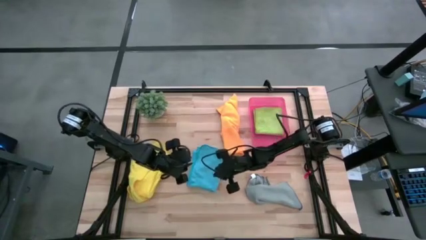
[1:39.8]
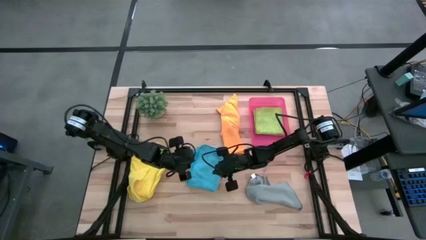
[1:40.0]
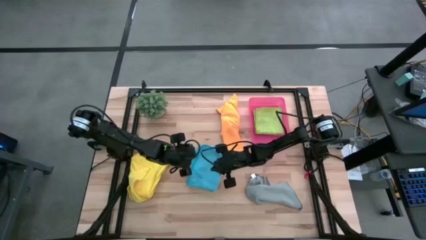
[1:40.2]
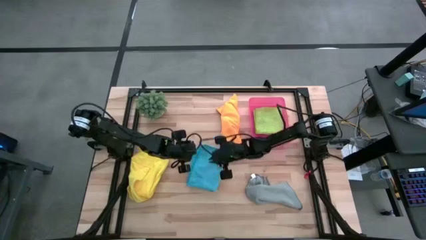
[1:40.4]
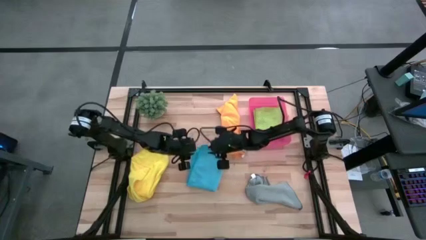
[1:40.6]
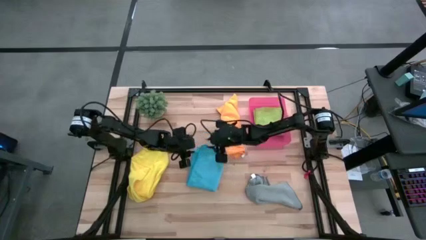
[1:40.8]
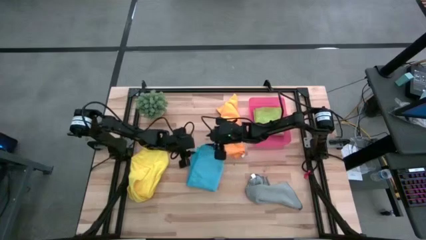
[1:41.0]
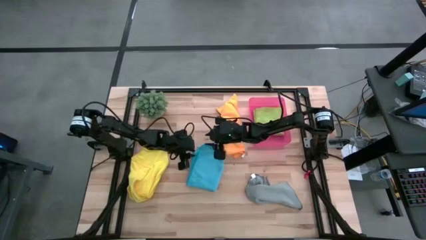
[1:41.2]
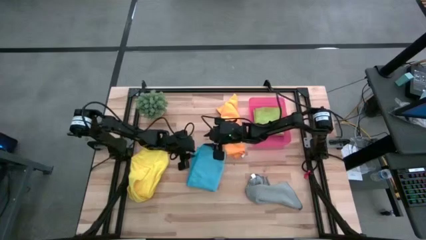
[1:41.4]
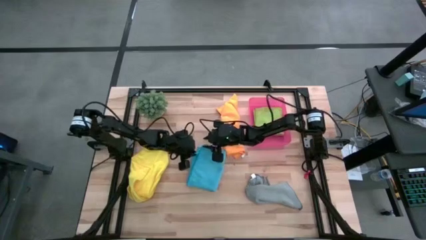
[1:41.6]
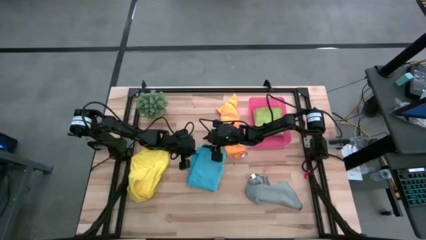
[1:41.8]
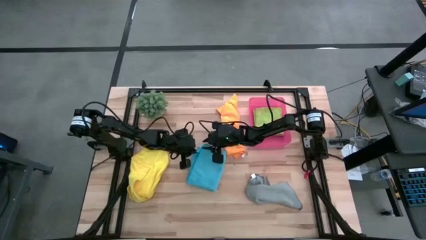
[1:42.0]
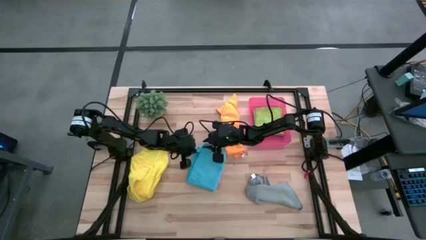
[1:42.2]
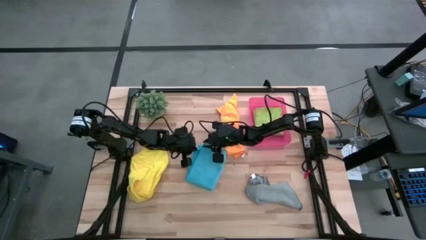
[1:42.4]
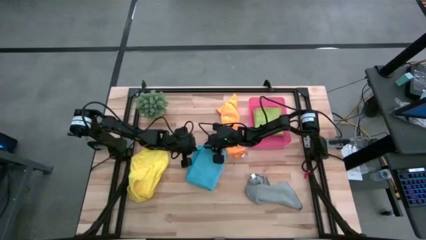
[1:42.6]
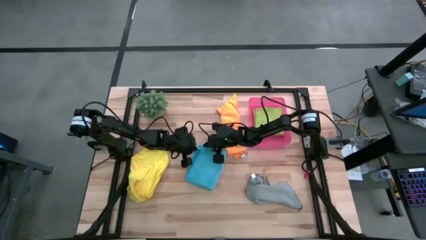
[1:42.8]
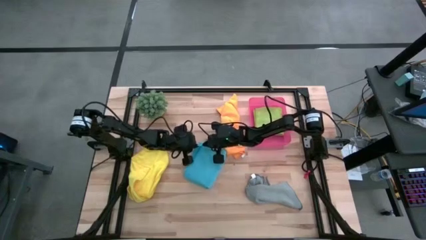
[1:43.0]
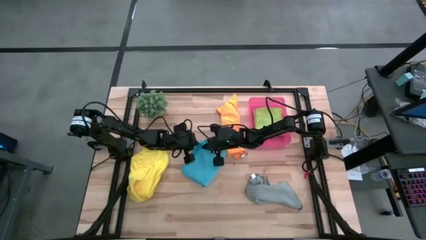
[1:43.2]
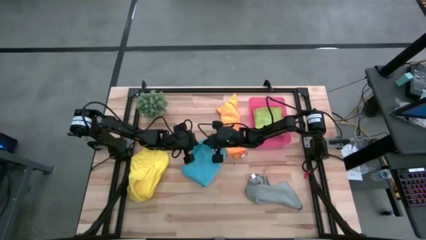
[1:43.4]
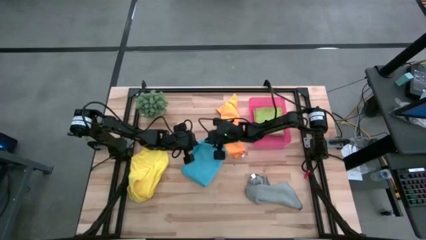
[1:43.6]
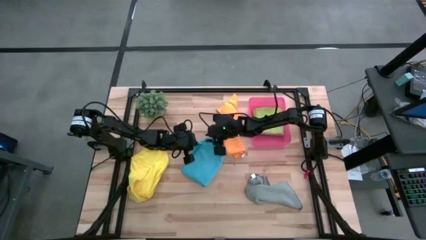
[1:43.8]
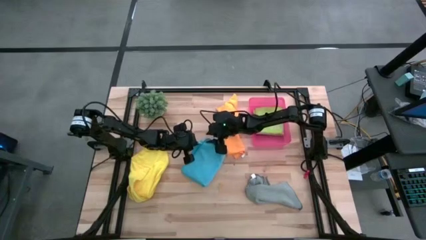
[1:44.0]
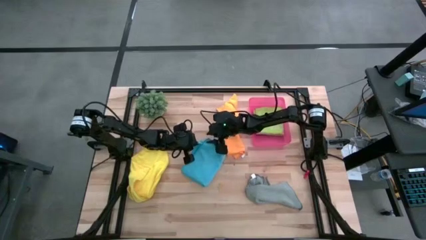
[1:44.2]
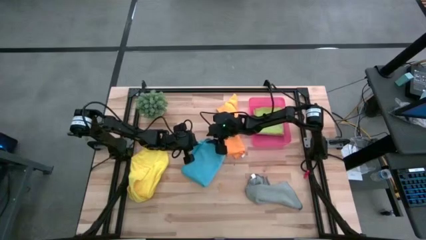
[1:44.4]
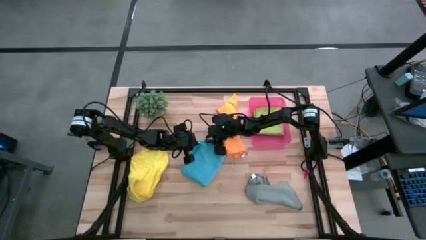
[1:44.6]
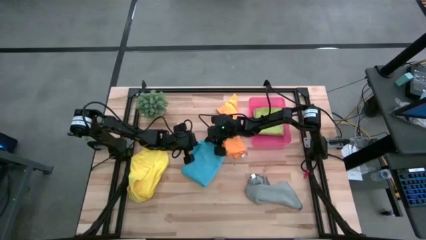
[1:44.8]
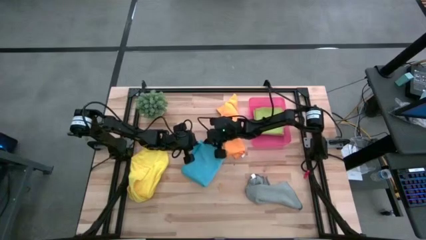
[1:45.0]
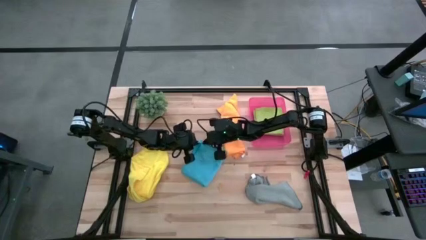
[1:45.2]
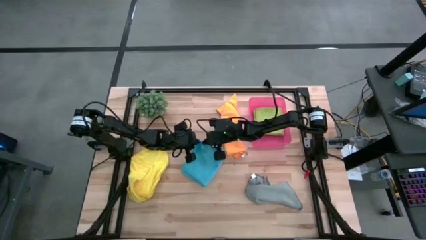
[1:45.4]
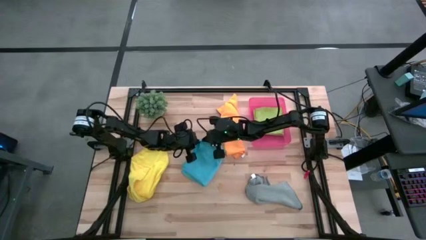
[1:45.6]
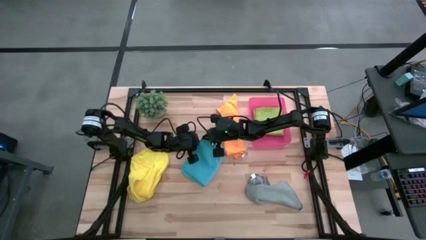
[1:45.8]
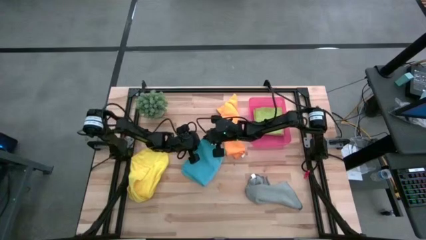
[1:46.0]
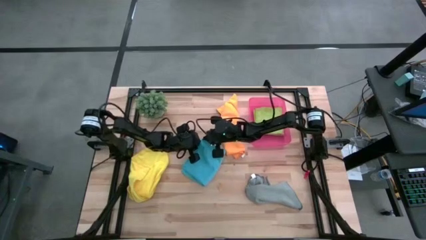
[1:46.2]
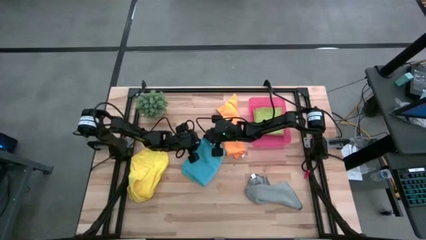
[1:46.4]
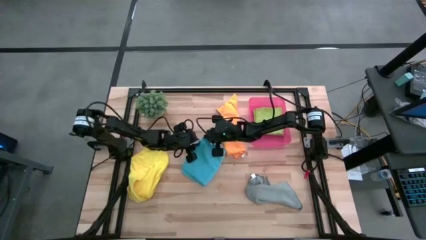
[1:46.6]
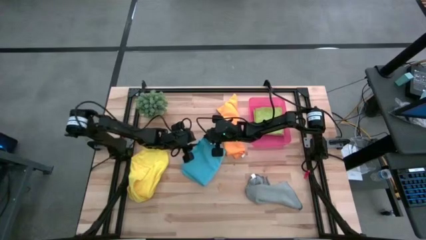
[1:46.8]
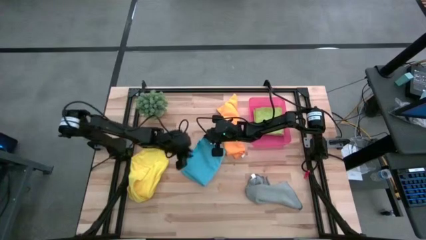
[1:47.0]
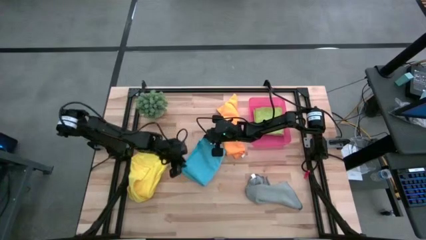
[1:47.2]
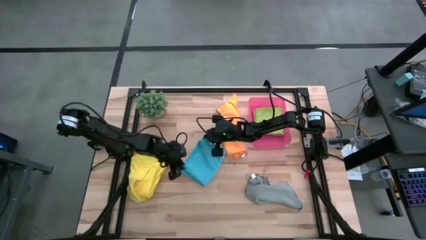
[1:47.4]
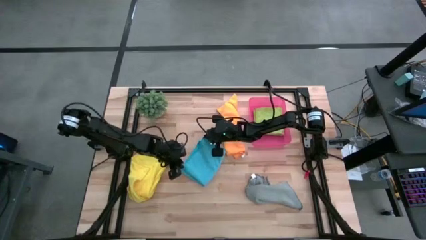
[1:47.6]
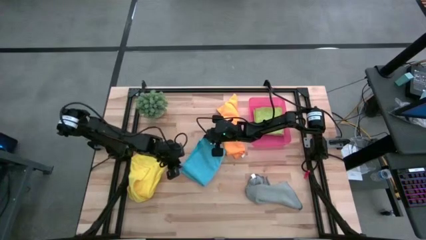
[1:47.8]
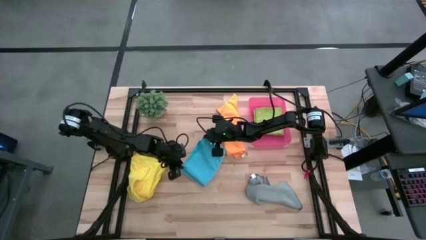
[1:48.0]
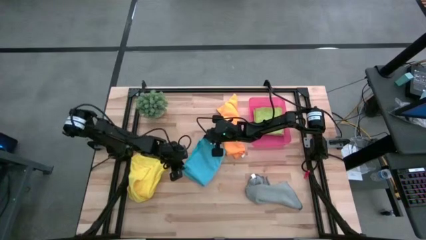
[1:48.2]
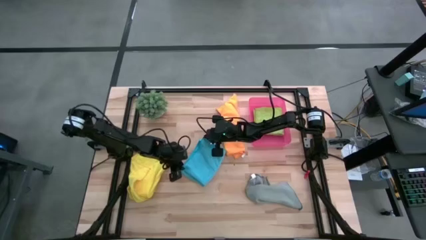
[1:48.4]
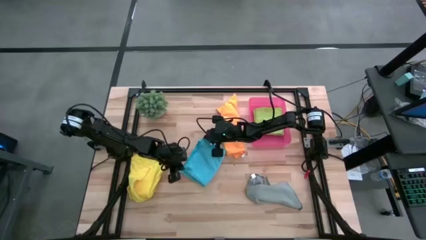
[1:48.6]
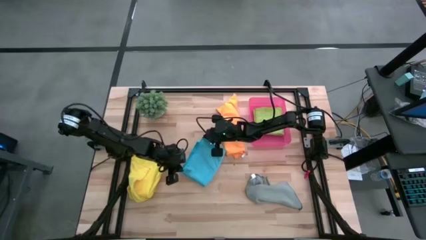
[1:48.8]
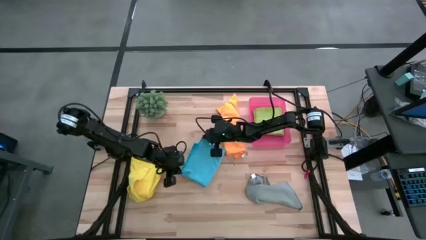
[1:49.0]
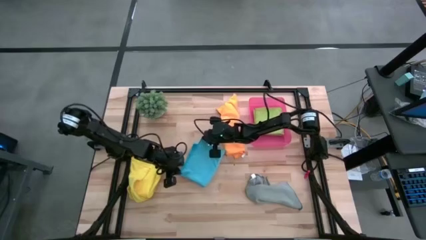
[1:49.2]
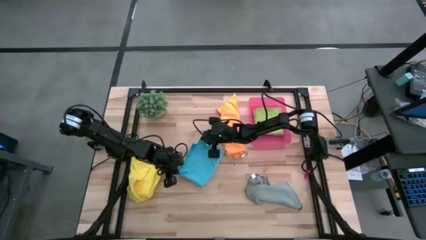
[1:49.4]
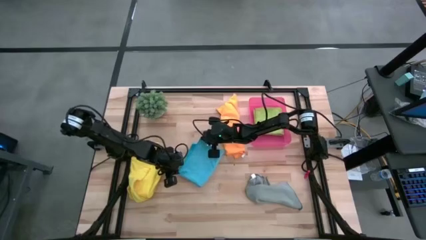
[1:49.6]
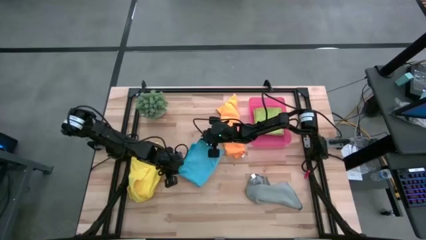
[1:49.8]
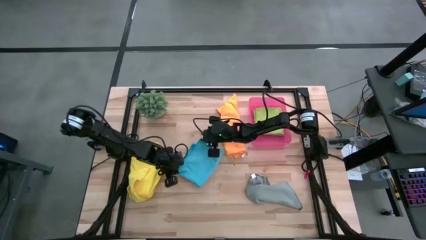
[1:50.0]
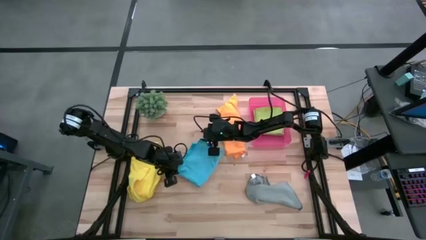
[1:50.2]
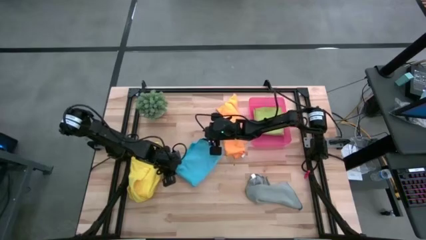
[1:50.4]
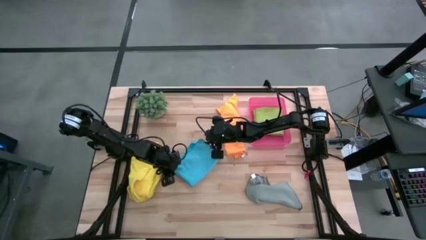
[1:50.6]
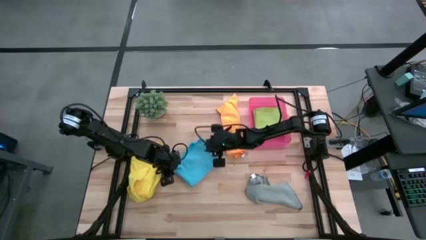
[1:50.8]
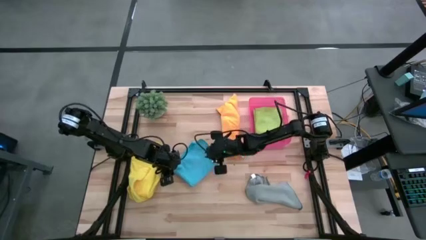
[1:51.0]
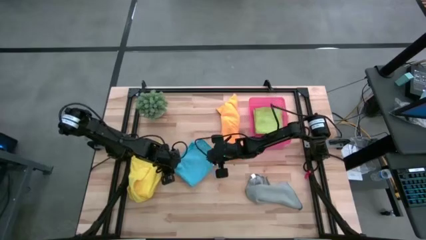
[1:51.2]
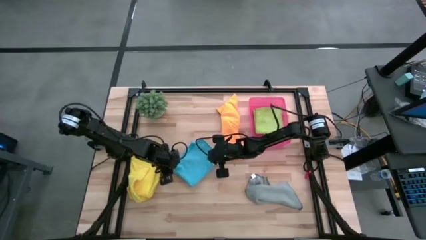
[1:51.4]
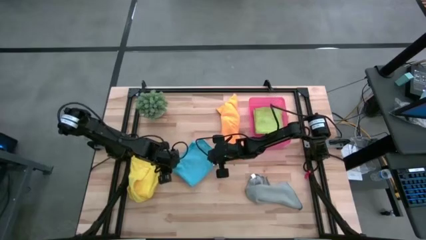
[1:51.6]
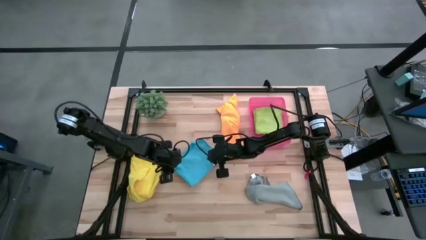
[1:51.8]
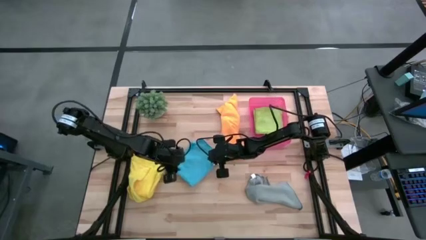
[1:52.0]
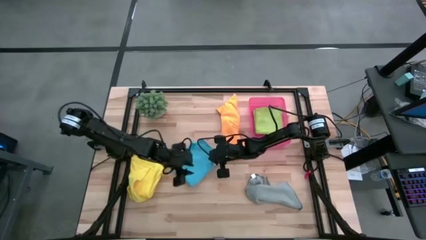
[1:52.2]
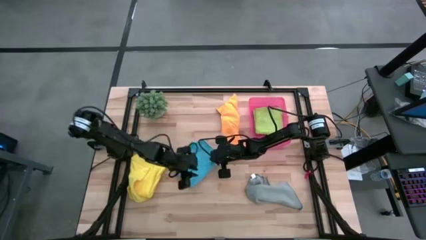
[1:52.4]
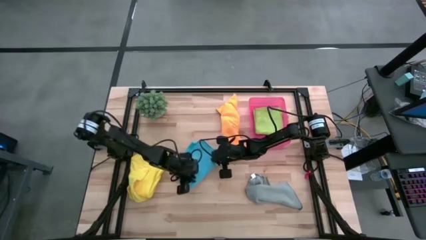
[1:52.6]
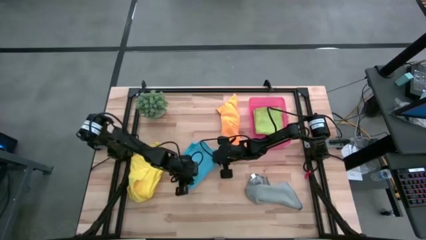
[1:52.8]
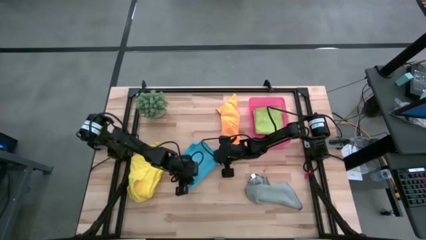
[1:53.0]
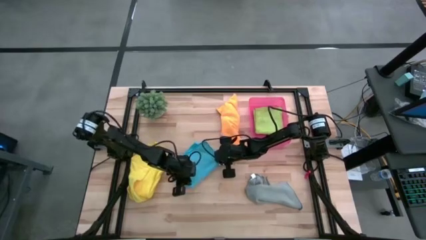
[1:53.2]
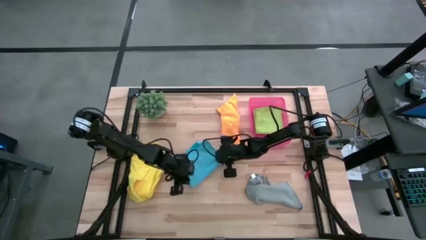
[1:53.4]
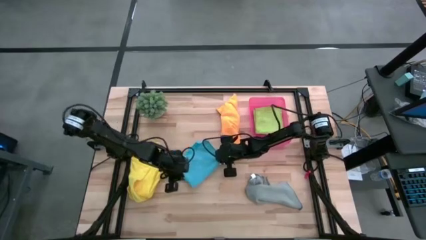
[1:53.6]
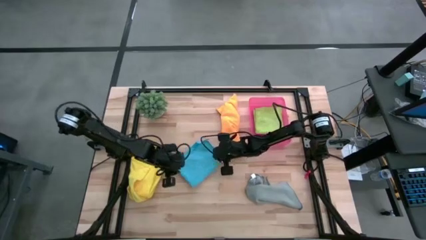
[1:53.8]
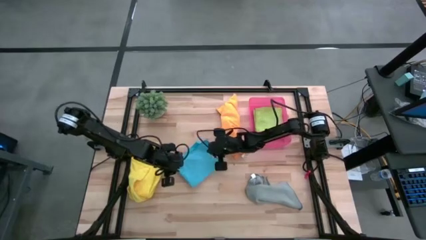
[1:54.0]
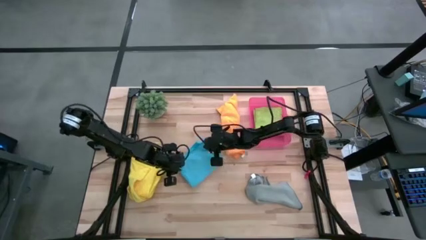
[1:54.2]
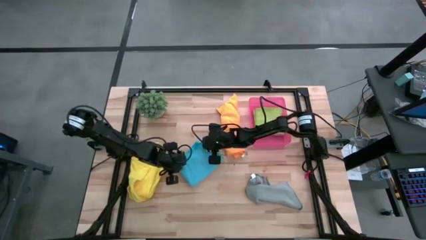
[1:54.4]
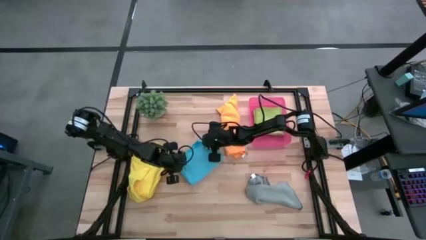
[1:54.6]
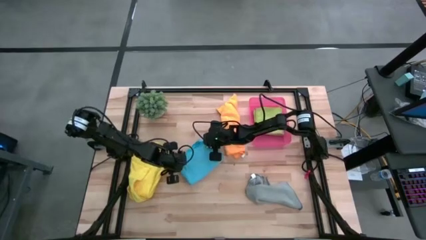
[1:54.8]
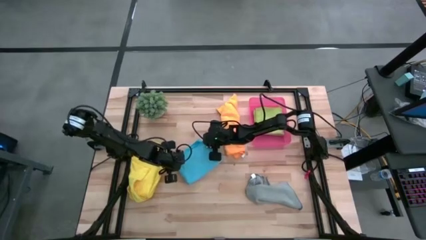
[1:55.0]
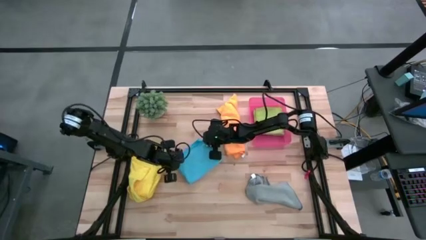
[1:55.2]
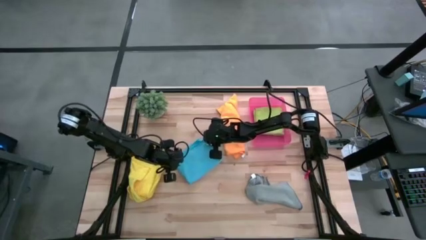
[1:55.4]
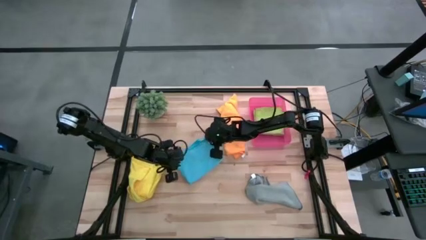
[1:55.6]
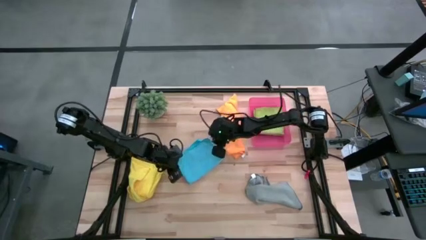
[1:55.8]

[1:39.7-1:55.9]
Task: Fold microfiber towels
Fold the blue microfiber cloth
